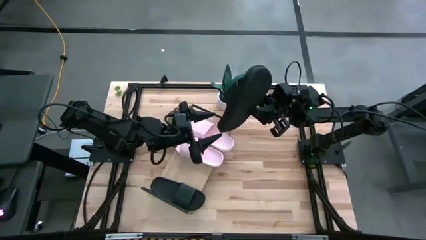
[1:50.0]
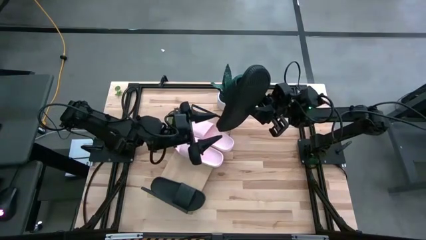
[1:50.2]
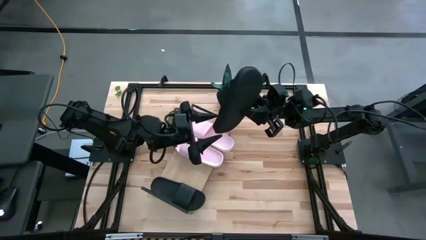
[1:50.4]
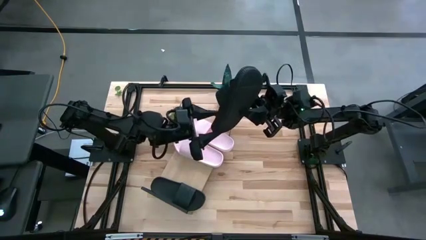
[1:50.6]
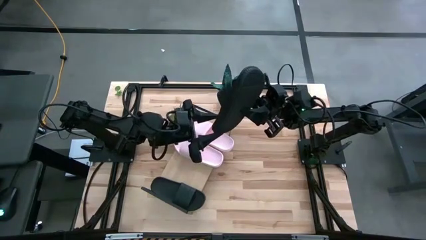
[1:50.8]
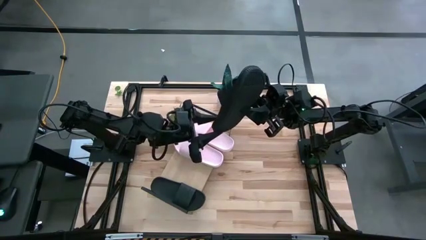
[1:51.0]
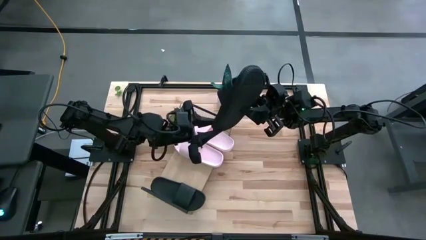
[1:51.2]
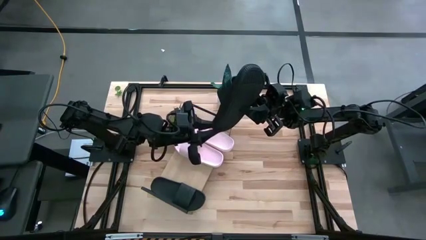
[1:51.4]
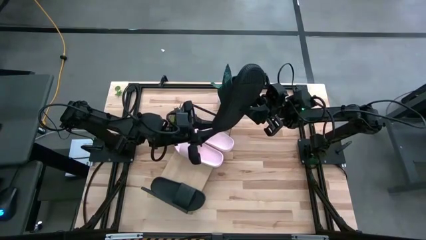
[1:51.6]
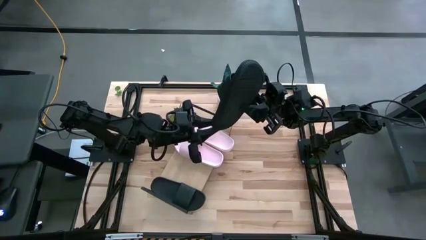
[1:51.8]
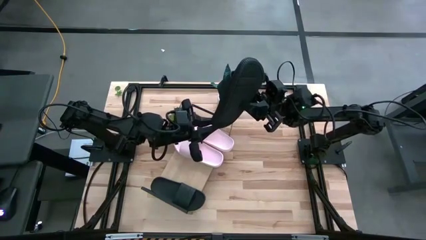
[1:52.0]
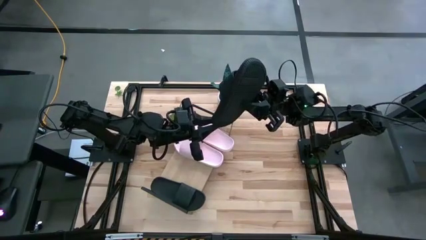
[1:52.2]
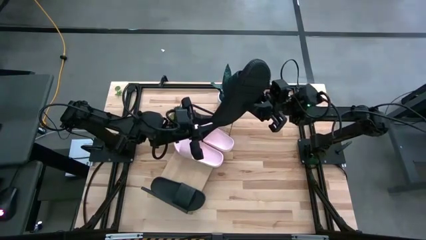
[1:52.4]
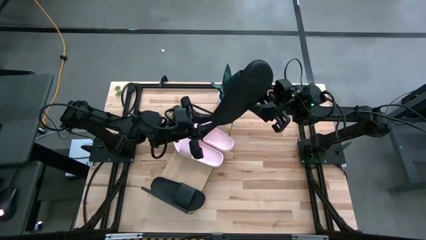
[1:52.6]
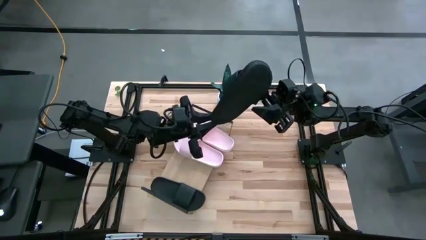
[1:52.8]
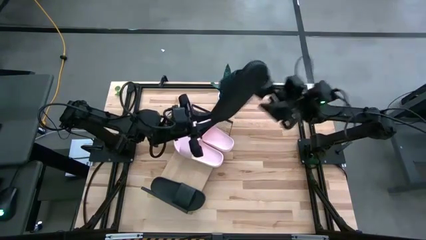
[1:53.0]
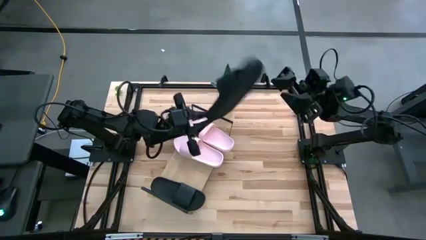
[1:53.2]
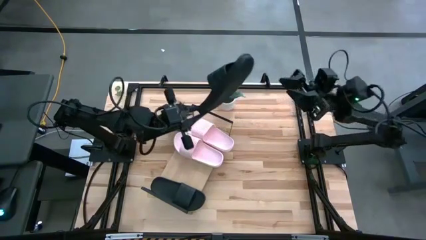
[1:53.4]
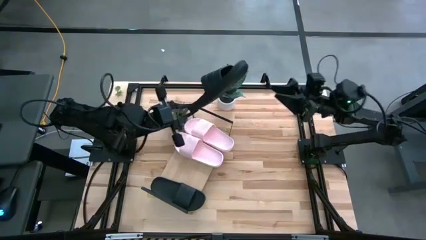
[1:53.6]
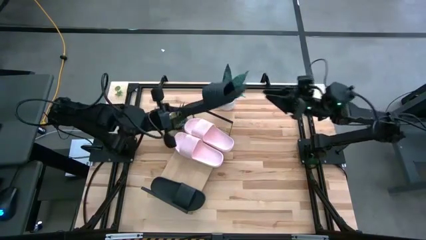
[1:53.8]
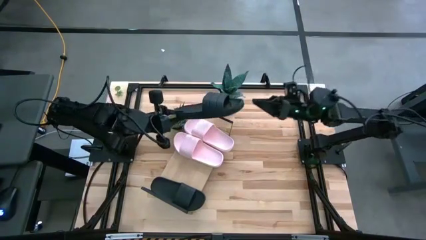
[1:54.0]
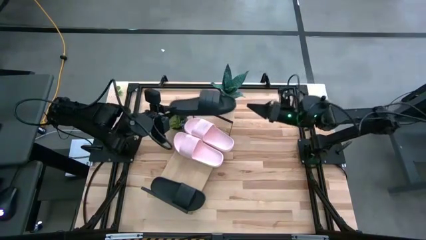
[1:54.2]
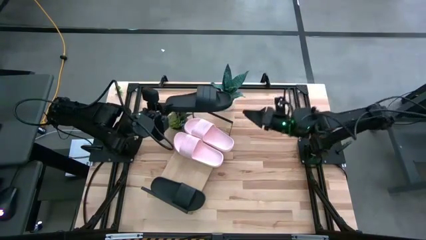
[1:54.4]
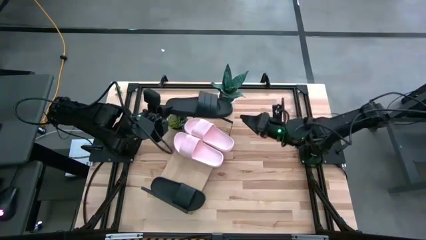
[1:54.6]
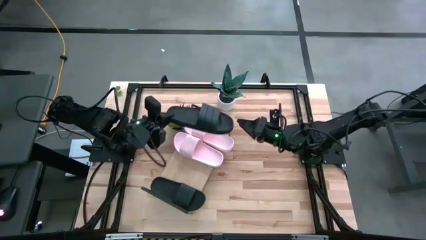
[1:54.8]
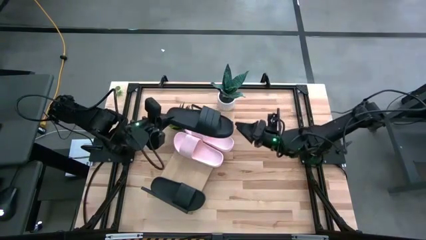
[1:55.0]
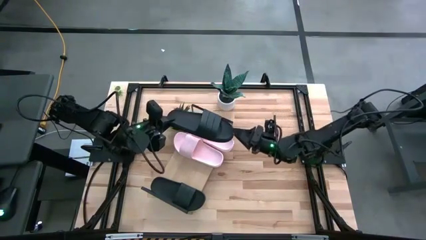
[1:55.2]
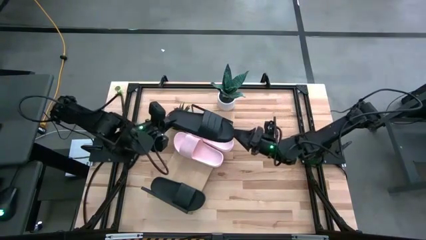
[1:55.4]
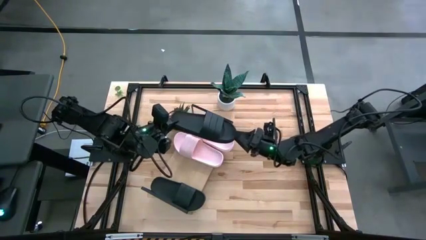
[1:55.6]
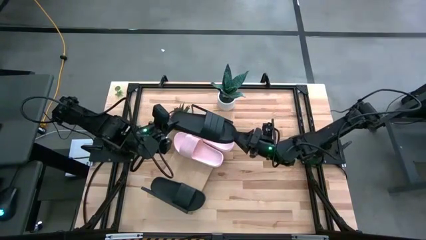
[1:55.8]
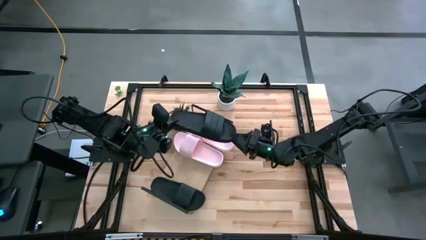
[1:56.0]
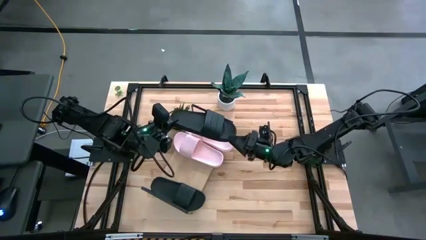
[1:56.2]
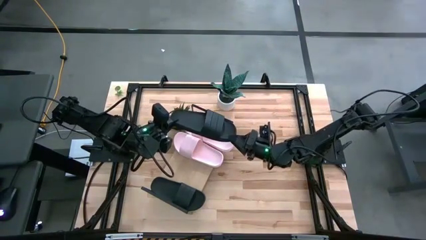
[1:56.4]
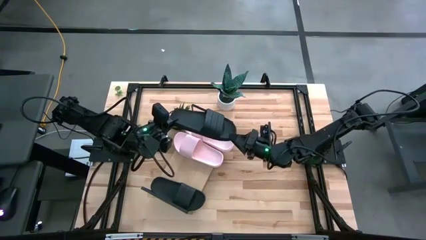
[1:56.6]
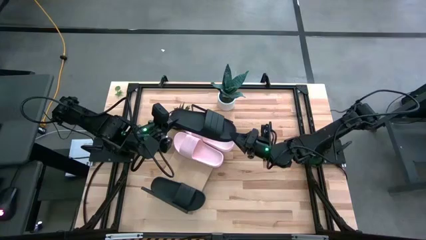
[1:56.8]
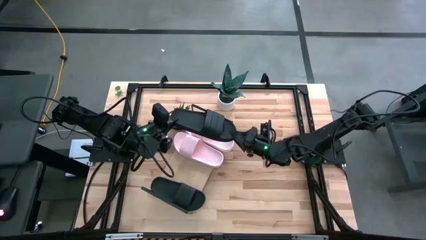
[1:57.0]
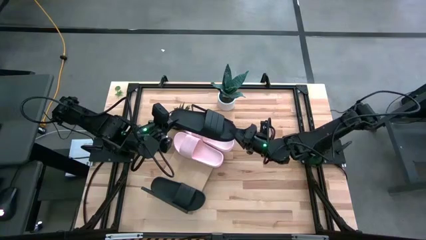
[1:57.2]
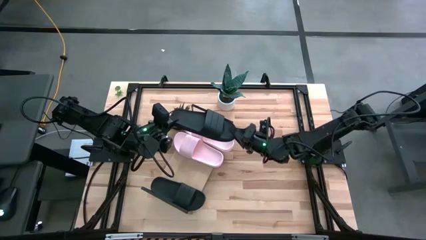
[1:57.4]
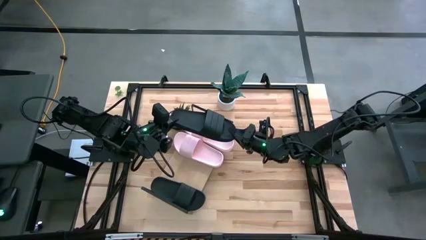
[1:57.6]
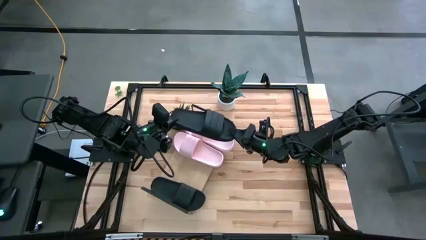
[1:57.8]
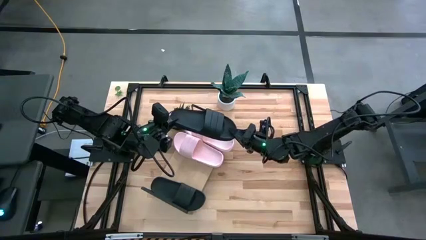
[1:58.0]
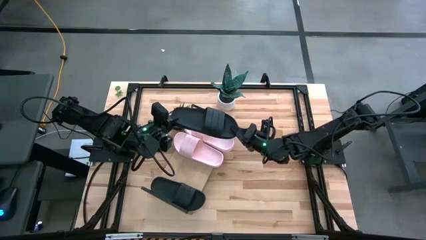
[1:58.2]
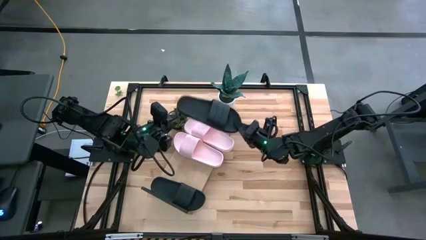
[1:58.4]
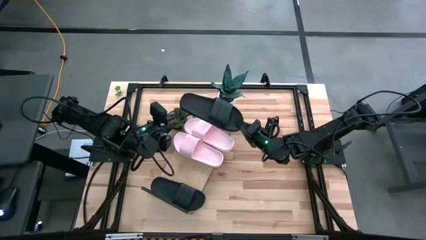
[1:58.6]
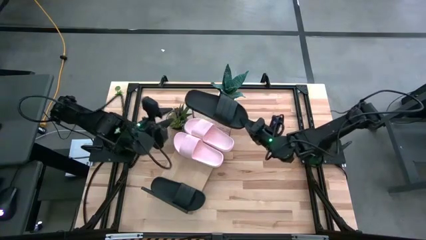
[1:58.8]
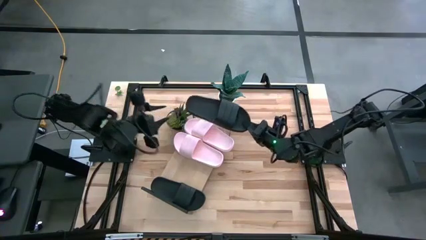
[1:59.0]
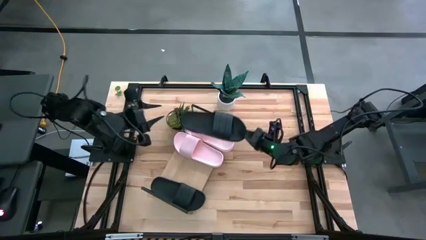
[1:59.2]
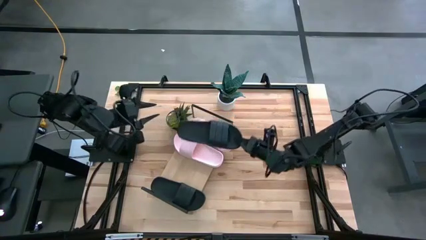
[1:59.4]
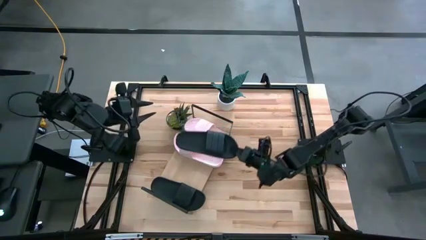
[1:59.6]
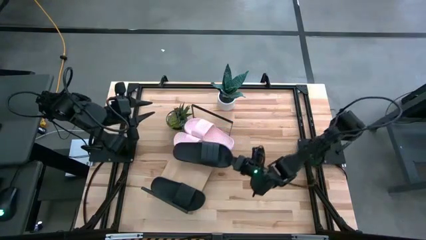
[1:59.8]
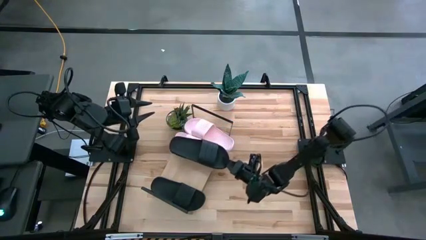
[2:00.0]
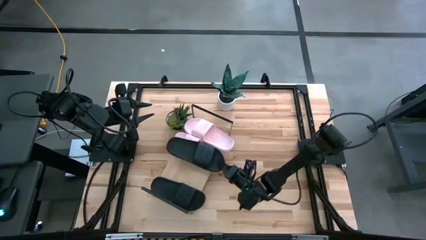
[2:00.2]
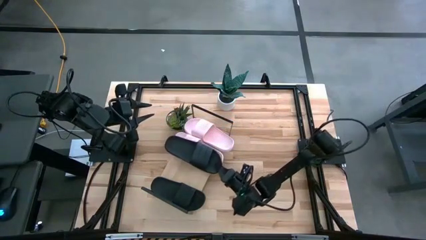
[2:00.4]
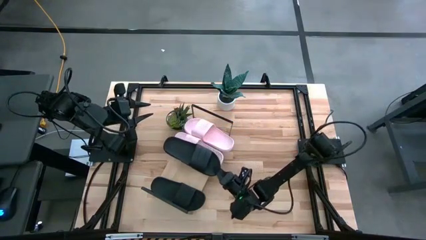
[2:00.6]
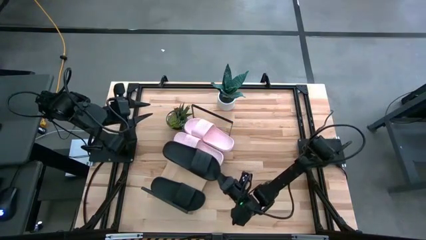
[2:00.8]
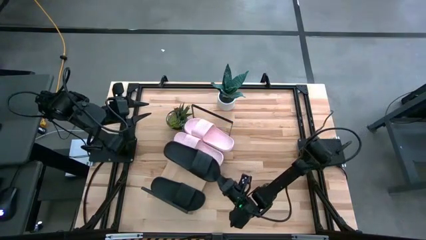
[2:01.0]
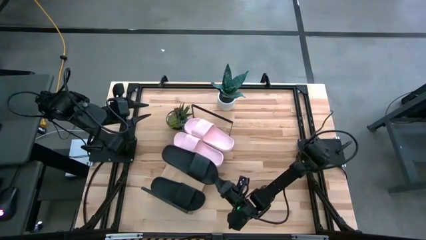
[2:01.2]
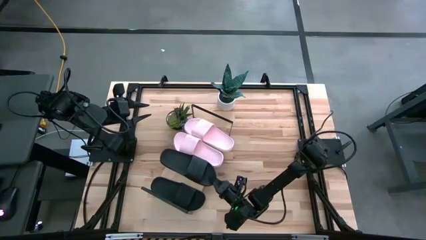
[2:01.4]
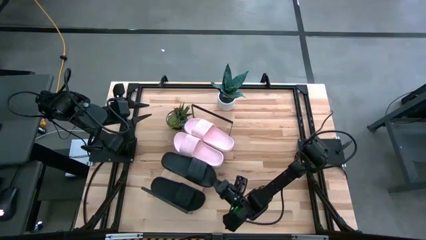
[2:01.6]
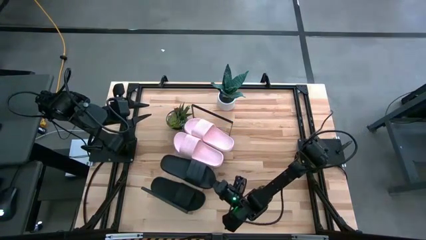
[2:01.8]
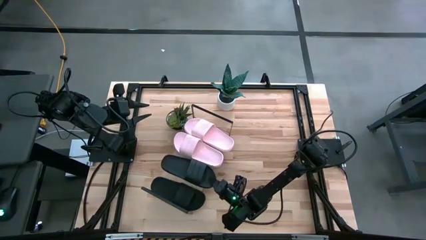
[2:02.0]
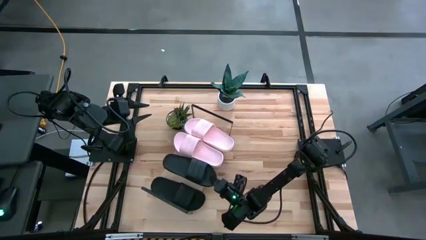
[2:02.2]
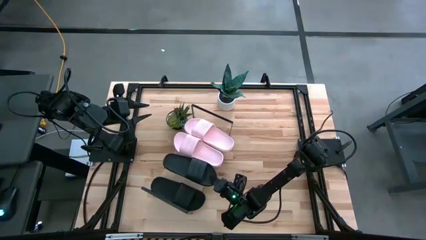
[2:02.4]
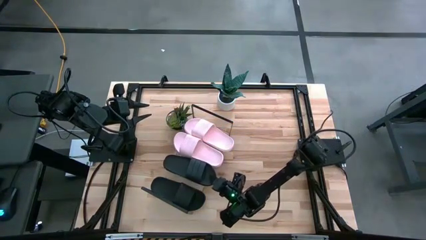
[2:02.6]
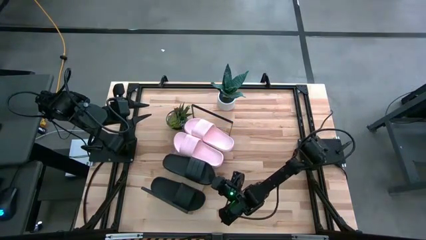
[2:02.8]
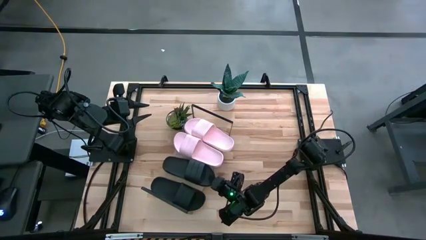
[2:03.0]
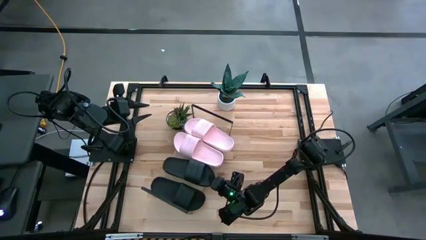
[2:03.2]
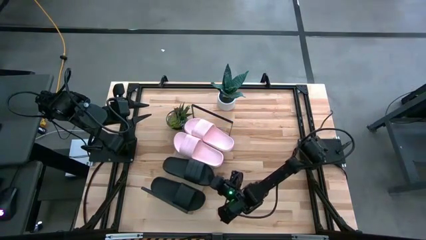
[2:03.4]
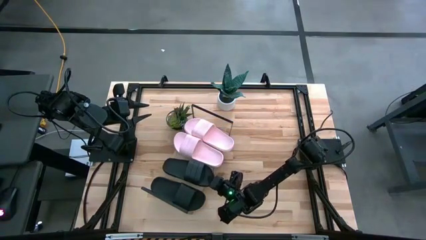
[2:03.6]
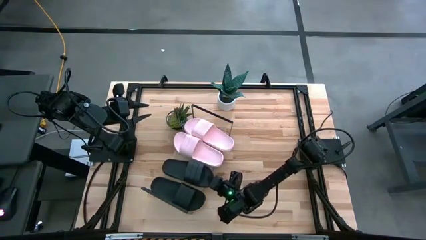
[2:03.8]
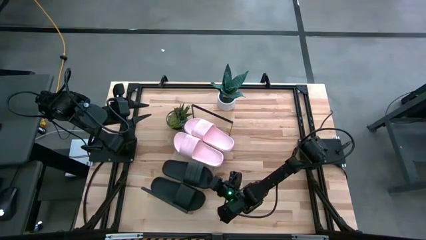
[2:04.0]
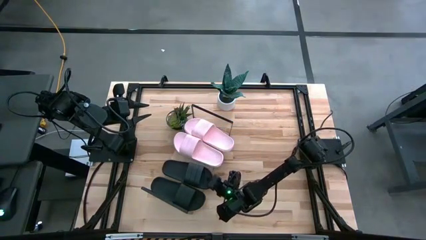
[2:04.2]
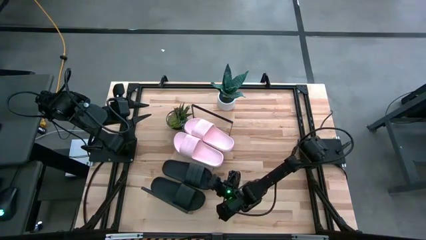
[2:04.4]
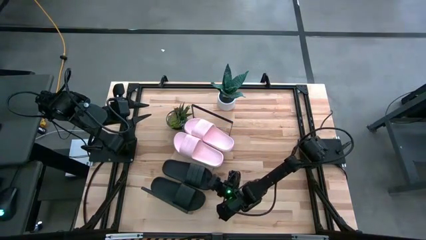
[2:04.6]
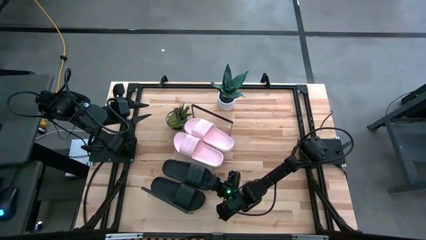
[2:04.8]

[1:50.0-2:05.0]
Task: Pick and place slides into the shelf
Put the black slide on the shelf
